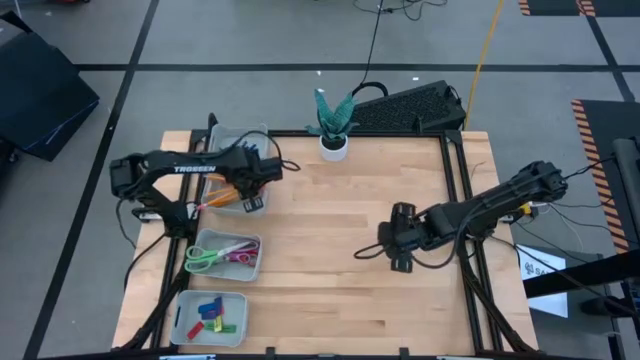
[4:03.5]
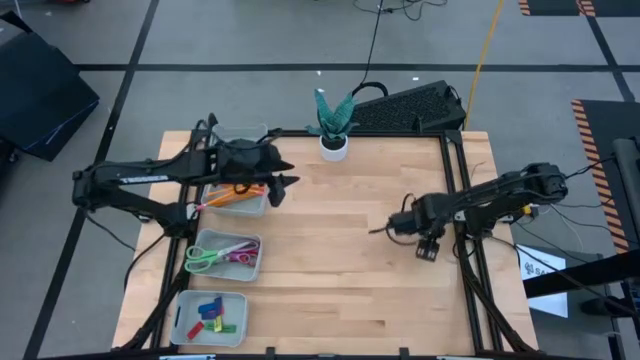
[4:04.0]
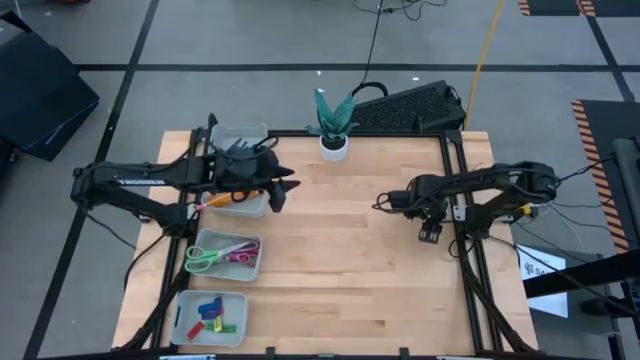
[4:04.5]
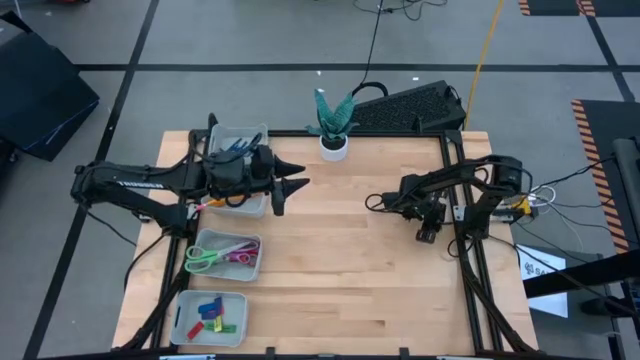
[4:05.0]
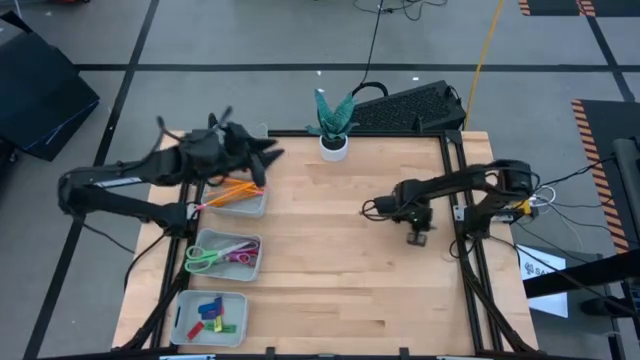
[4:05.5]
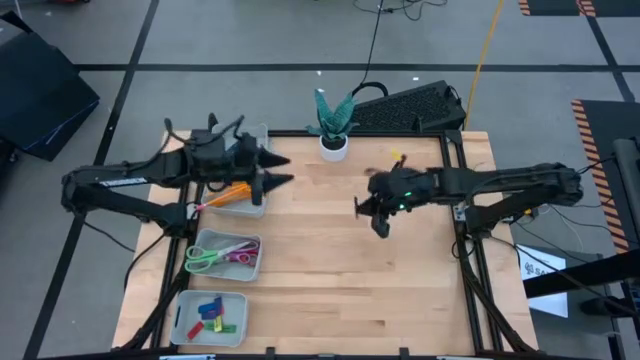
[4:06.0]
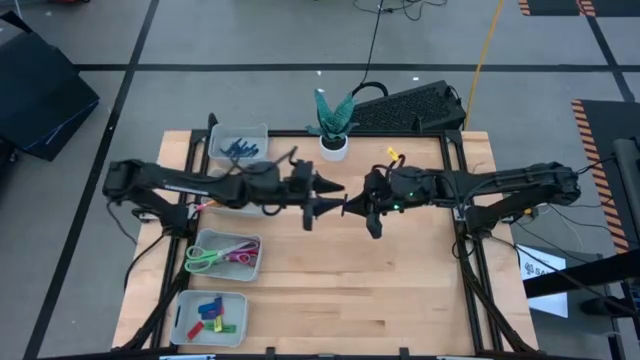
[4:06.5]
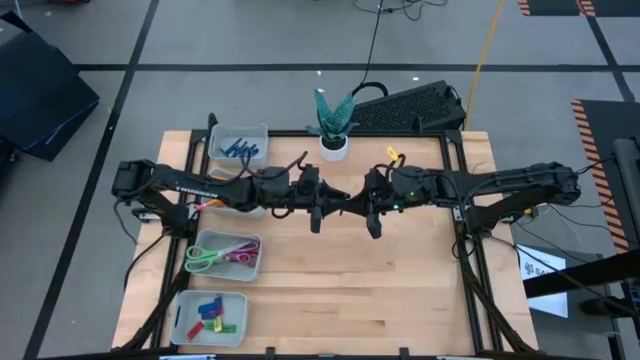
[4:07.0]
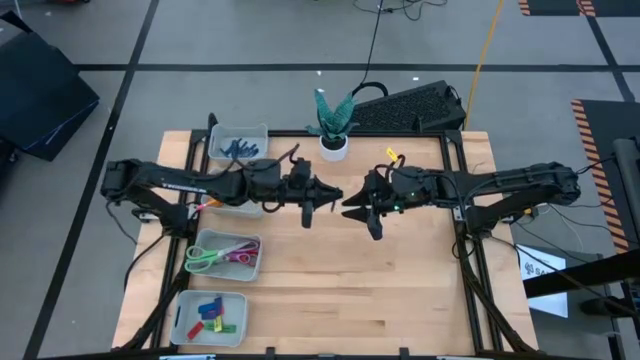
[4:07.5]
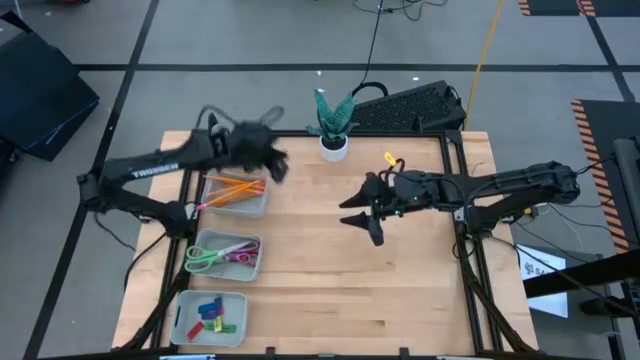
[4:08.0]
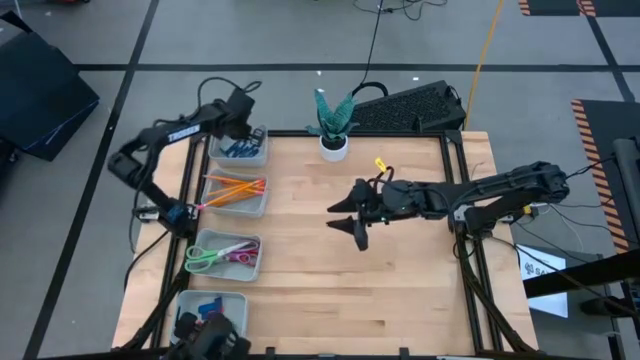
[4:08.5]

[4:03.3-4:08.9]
Task: Sort crayons/erasers/pens/pencils in bins
Put the blue crayon into the top gray bin

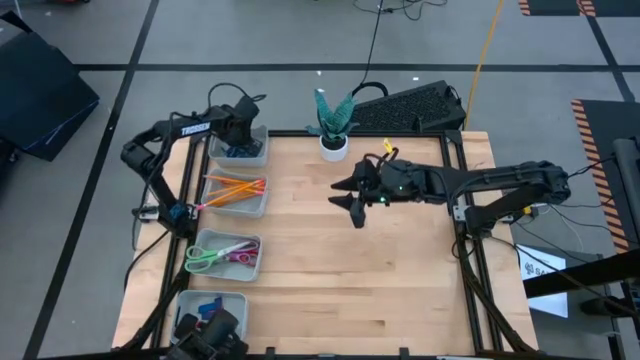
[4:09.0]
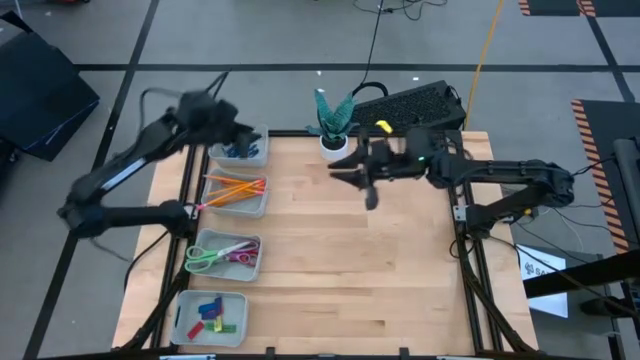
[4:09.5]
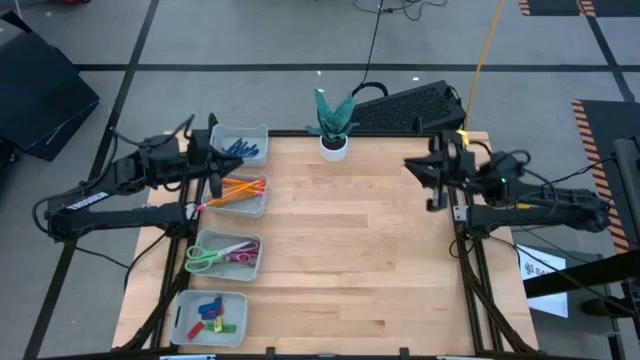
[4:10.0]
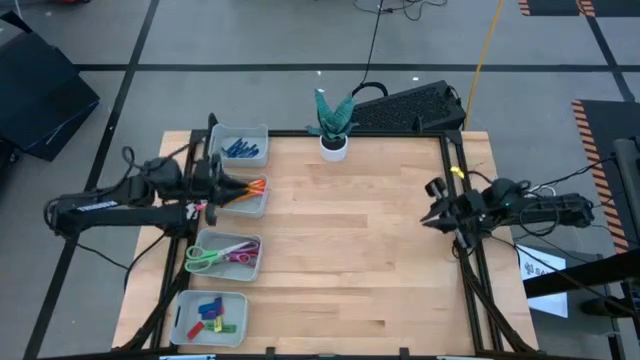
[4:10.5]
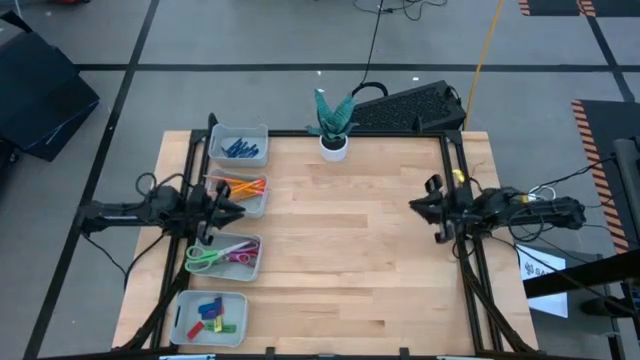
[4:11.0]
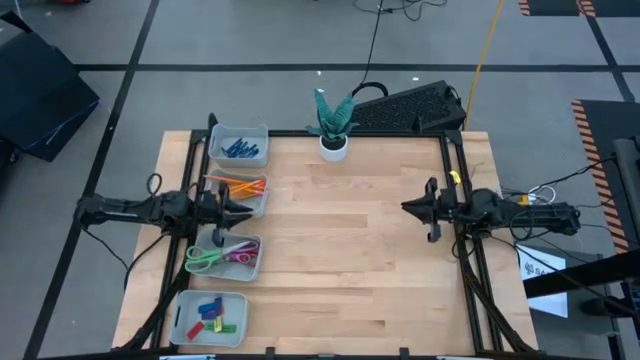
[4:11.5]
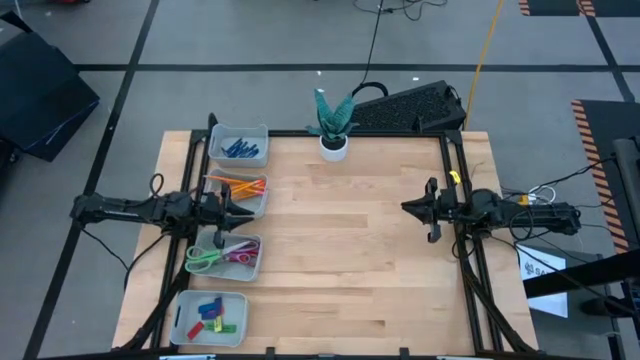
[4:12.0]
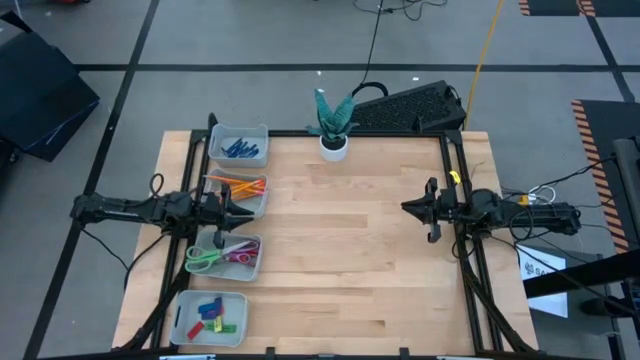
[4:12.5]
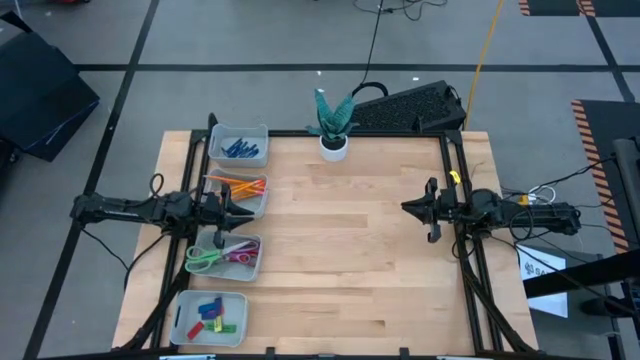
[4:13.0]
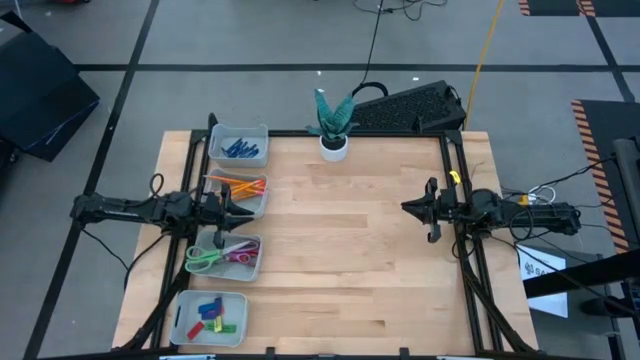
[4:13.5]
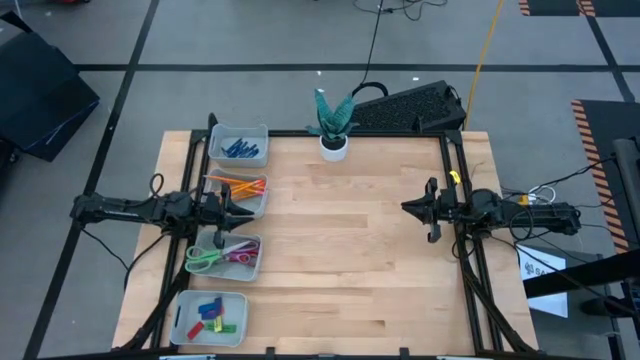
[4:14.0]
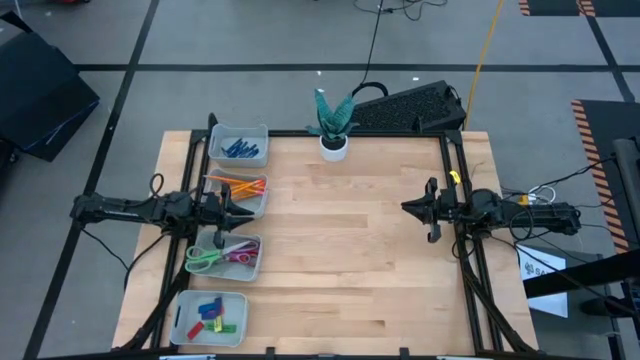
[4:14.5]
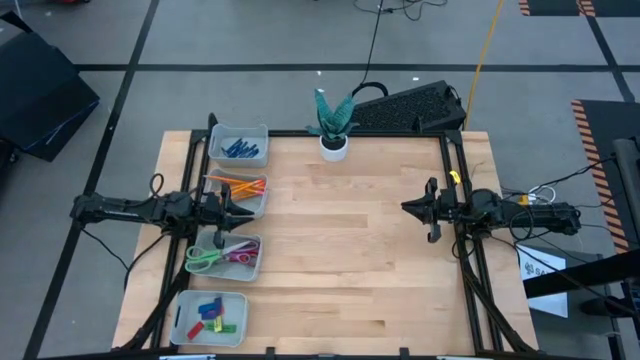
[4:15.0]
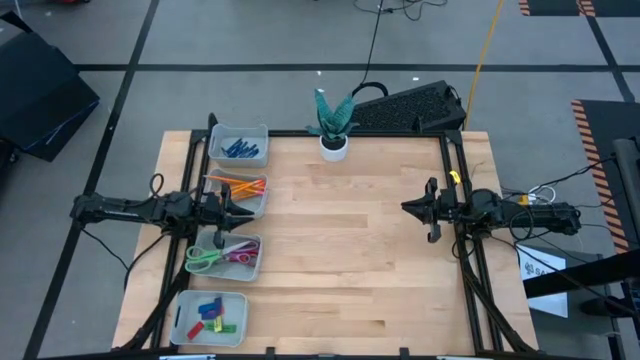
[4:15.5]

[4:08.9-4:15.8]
Return to Home Position

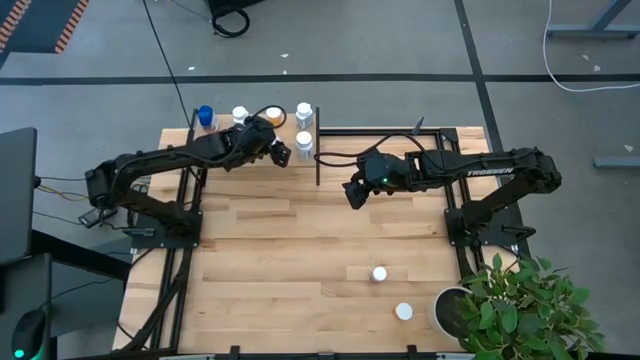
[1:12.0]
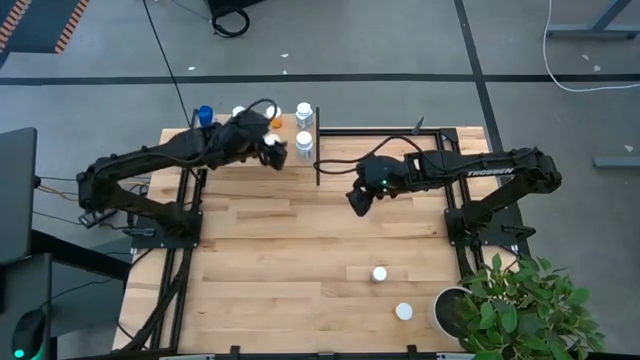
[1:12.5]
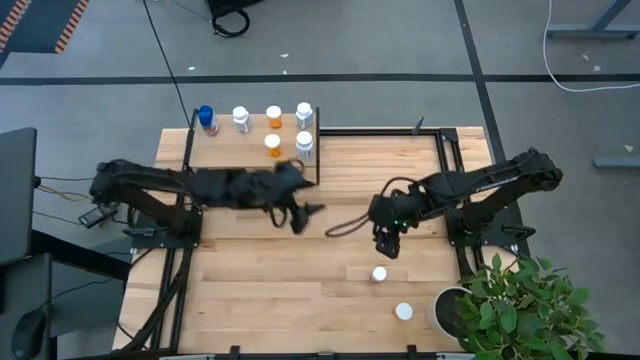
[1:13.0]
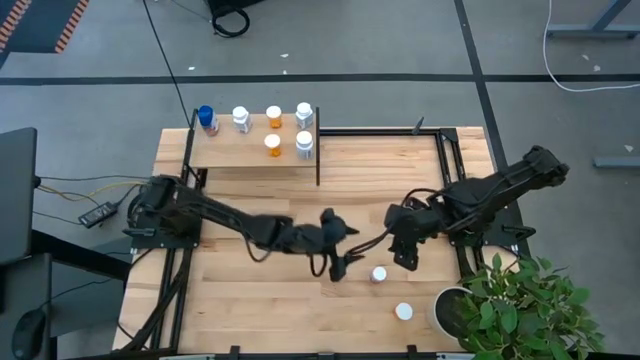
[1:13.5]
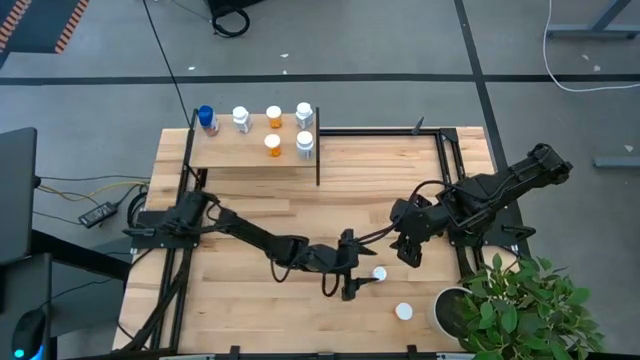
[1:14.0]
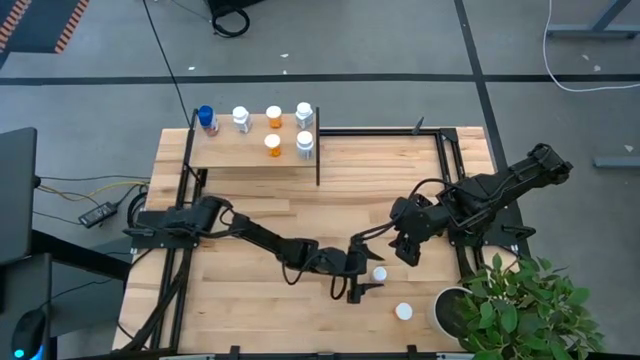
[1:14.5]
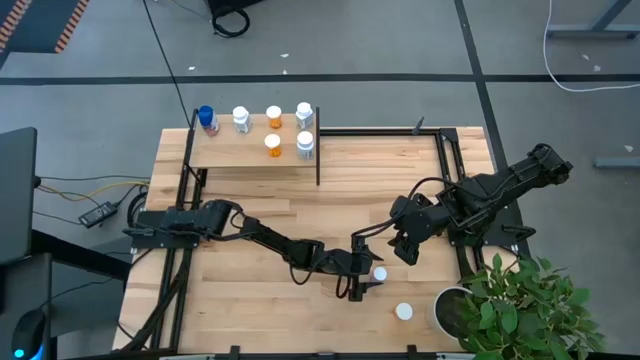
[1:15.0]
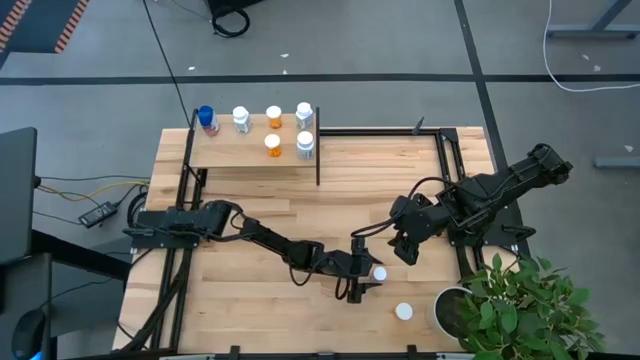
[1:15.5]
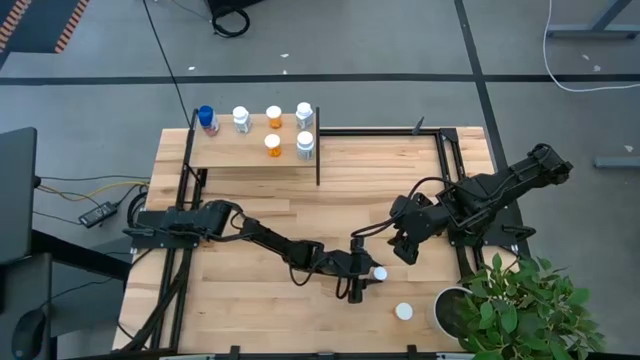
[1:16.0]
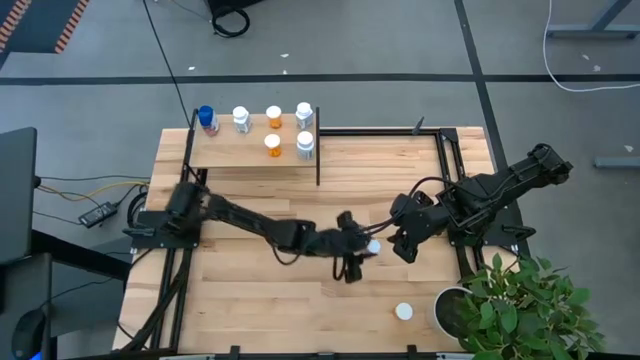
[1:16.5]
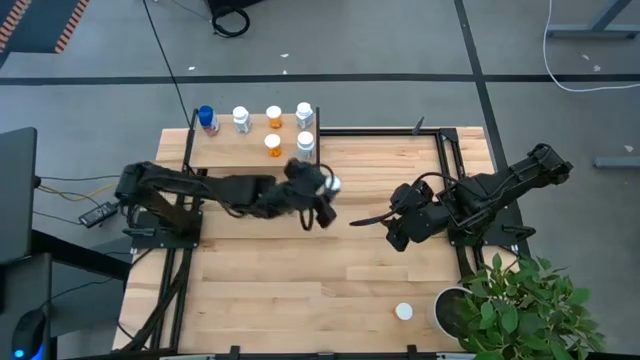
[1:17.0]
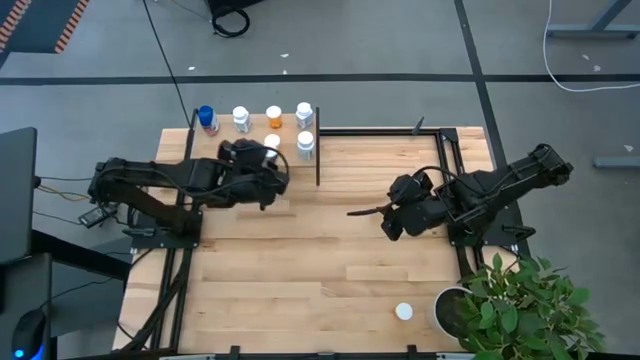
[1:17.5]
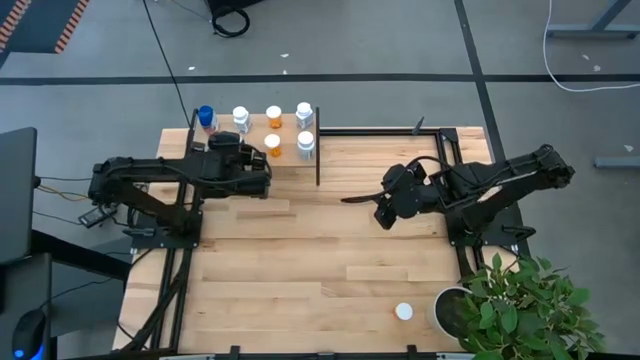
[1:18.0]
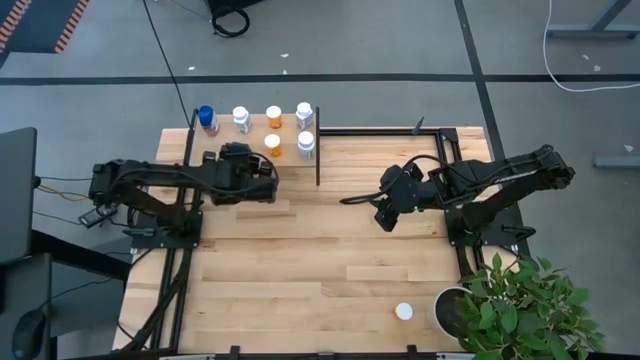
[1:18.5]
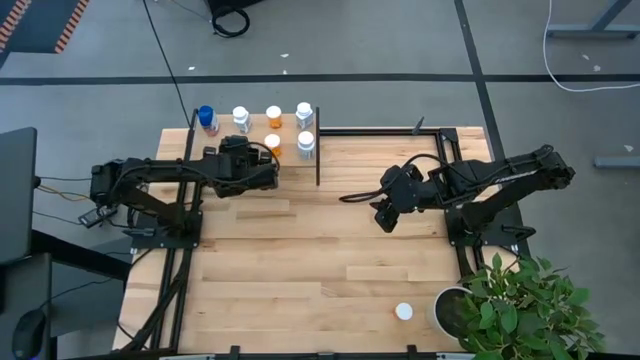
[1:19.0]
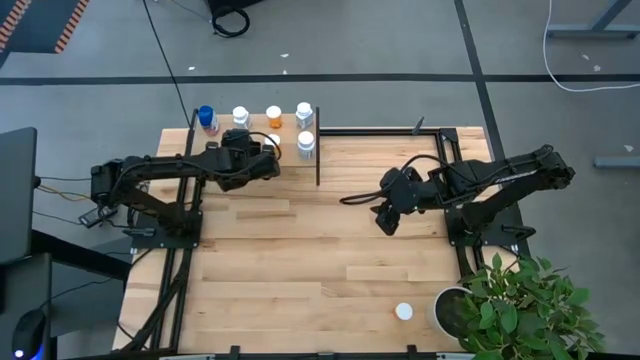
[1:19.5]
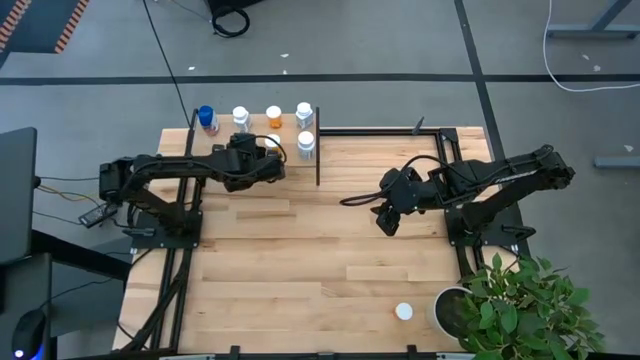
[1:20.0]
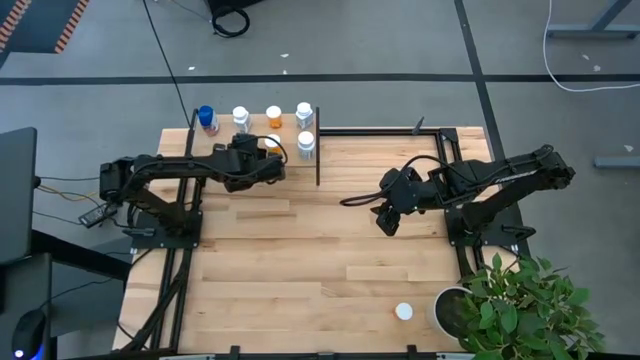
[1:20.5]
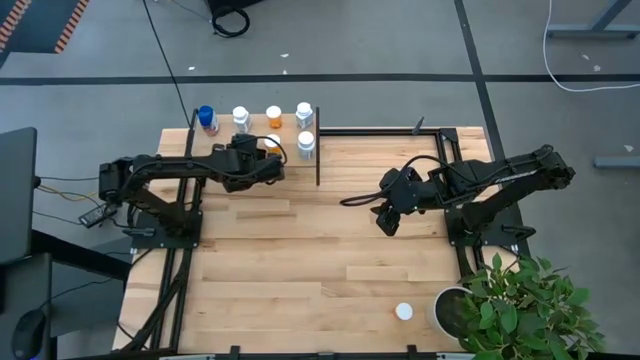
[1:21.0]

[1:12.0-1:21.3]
Task: Pick and place medicine bottles onto shelf by color
Put the pink pill bottle on the shelf
